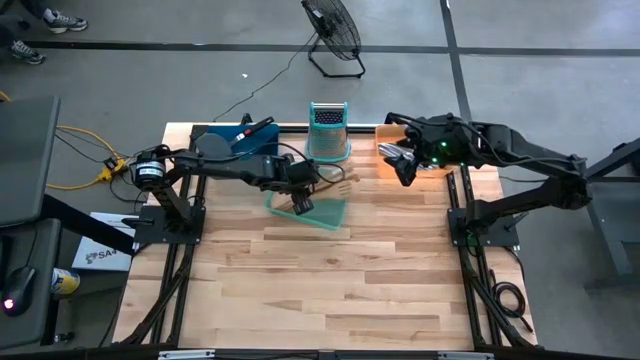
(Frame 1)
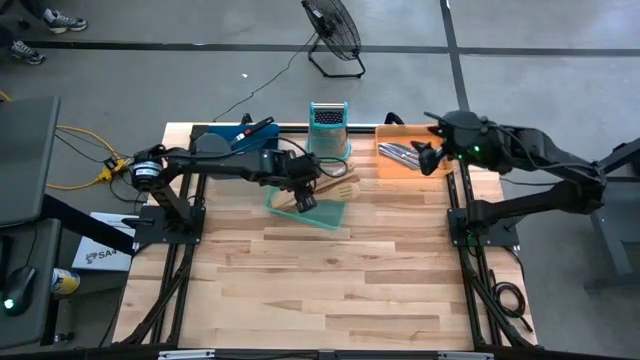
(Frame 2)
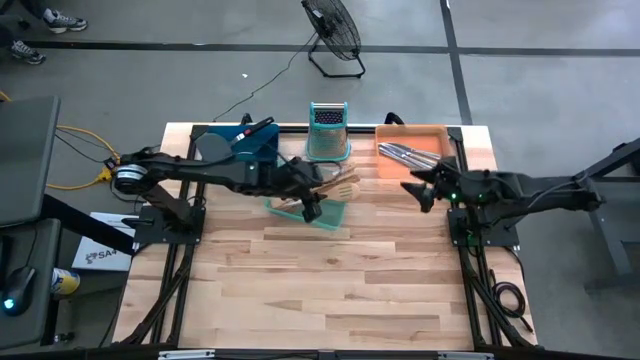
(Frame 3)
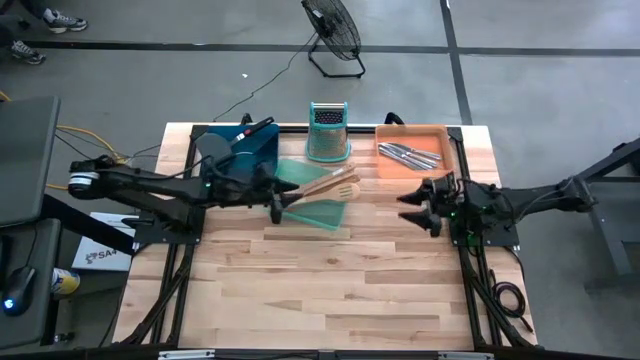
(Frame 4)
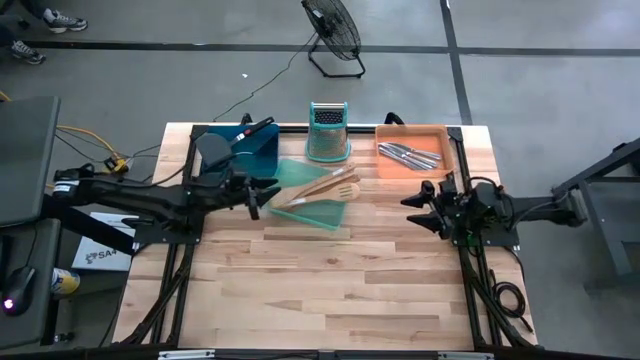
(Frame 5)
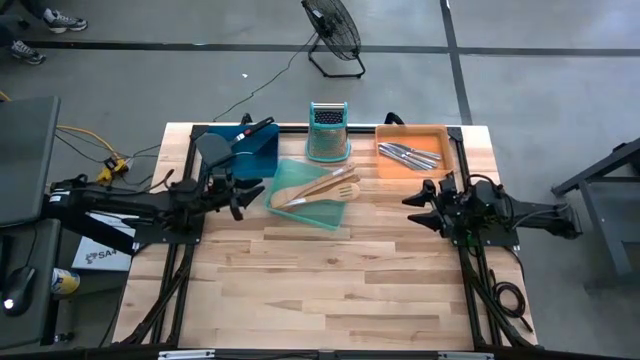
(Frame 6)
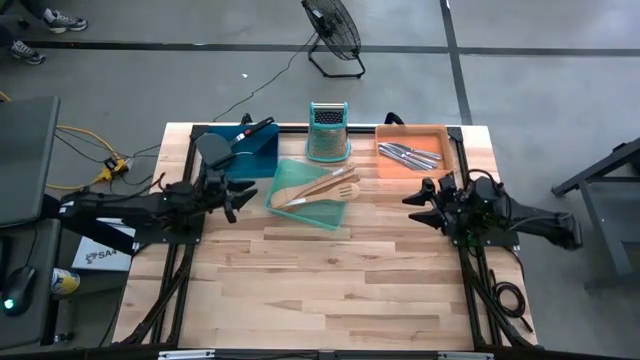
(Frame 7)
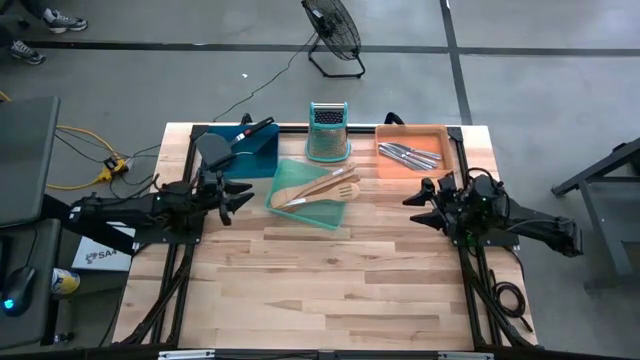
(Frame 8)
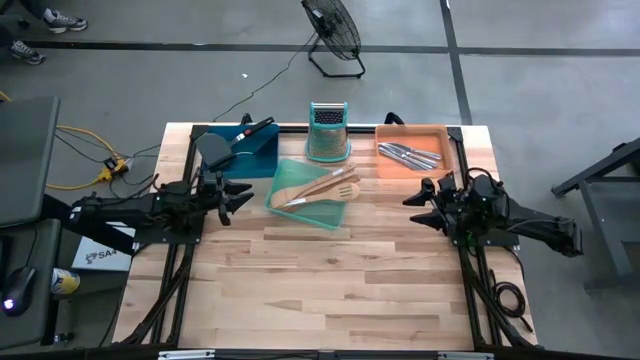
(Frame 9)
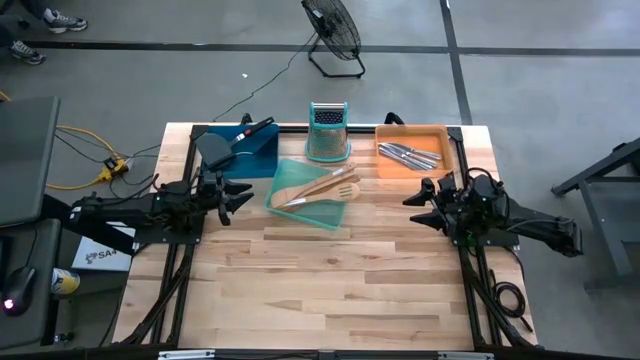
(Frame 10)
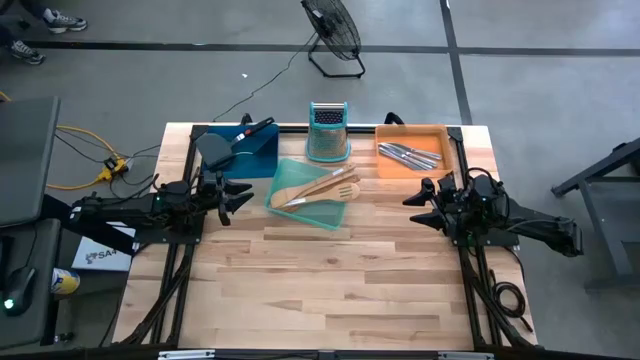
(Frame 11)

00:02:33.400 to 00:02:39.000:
Task: Pick & Place Kitchen Items
Return to Home Position

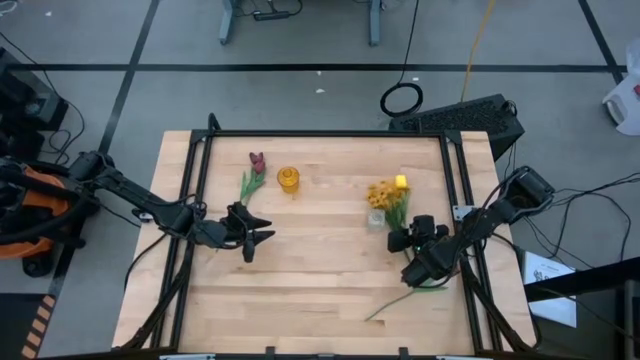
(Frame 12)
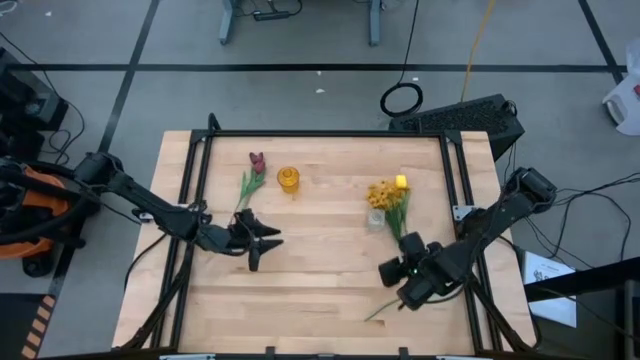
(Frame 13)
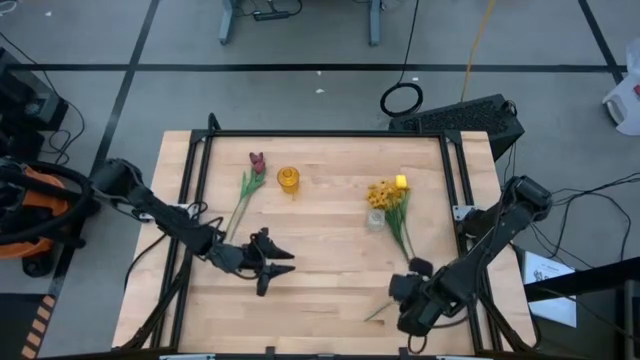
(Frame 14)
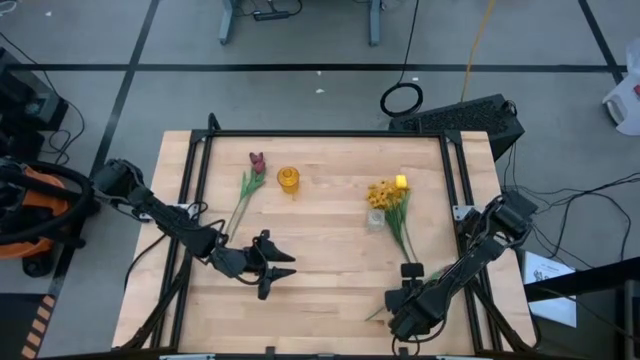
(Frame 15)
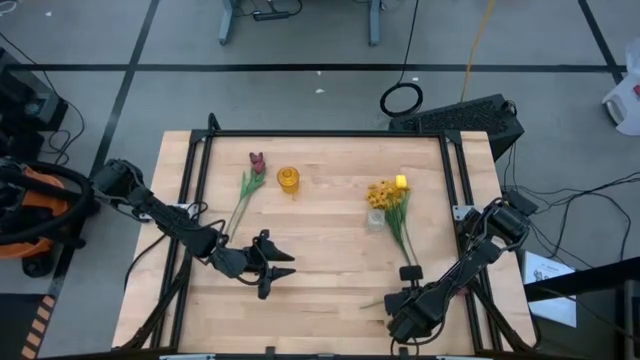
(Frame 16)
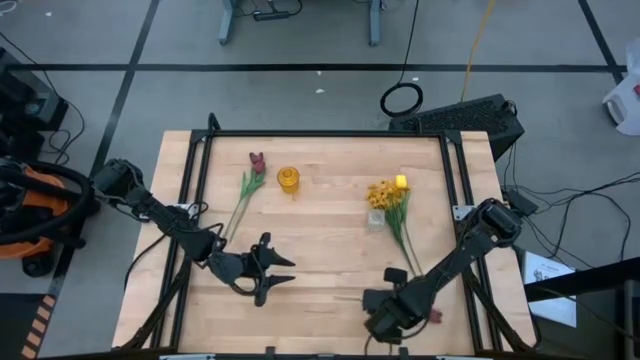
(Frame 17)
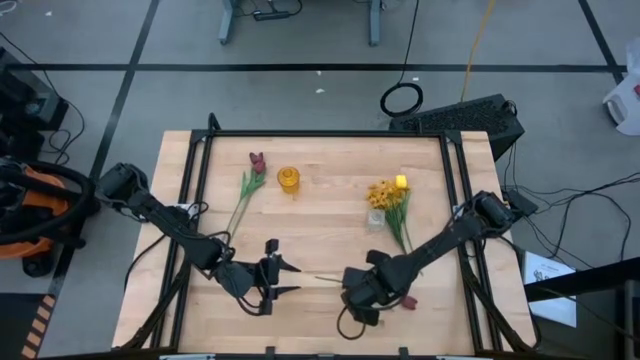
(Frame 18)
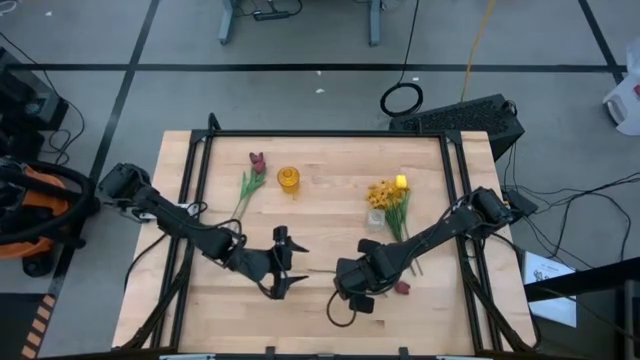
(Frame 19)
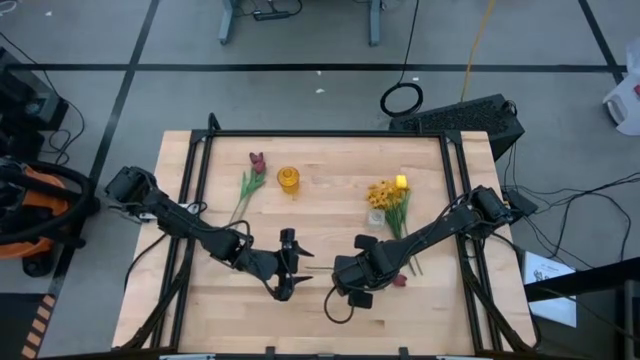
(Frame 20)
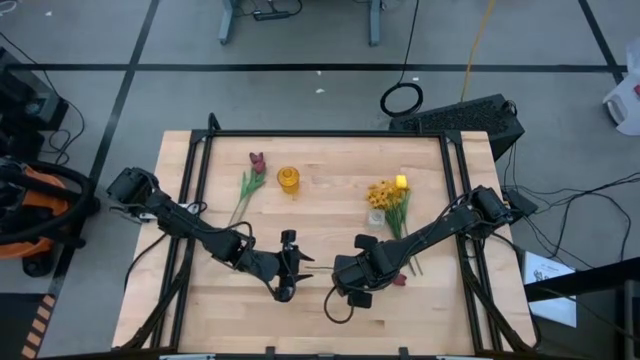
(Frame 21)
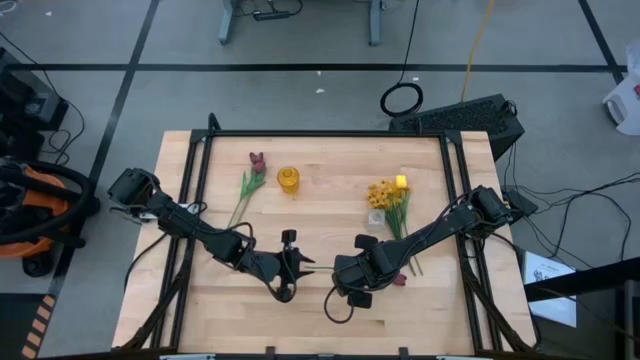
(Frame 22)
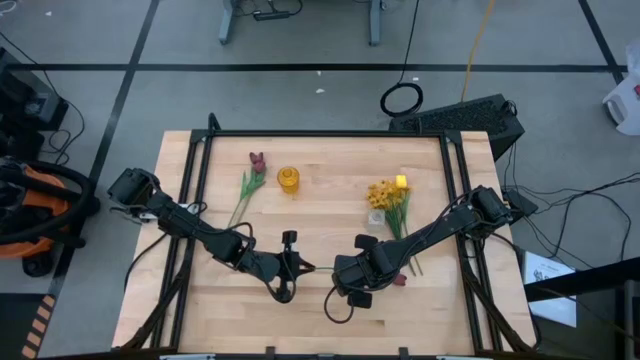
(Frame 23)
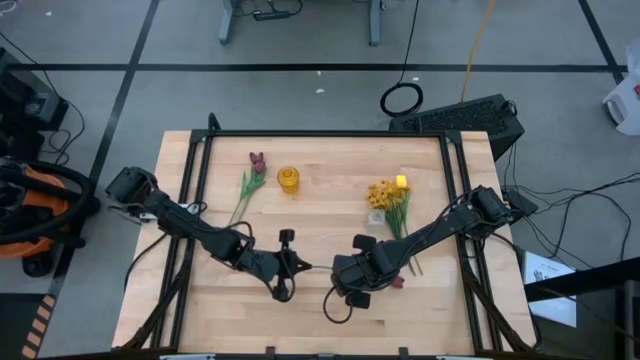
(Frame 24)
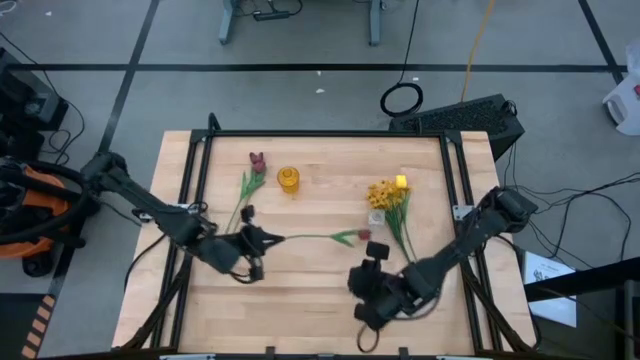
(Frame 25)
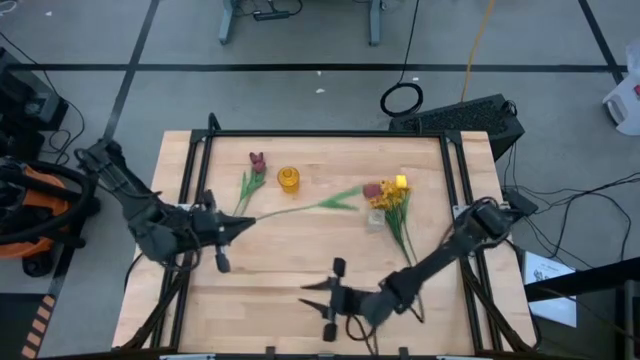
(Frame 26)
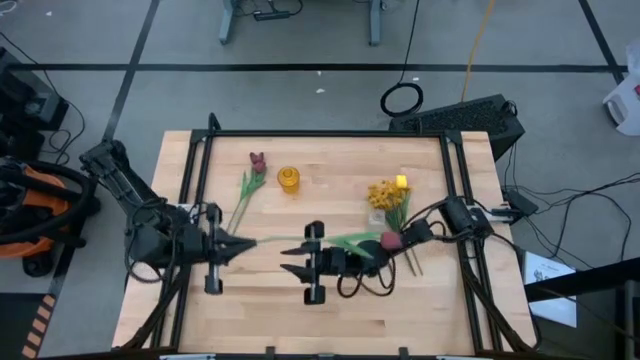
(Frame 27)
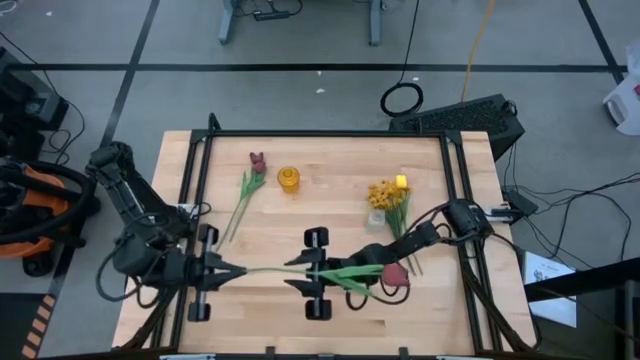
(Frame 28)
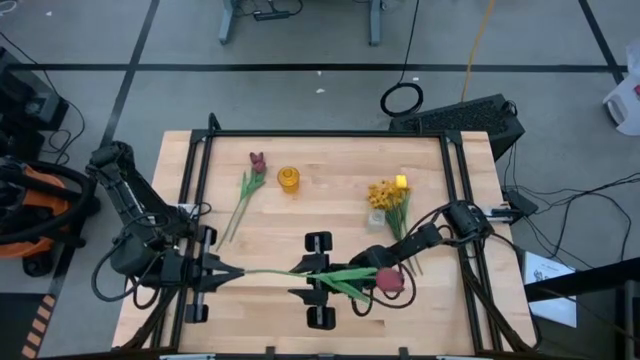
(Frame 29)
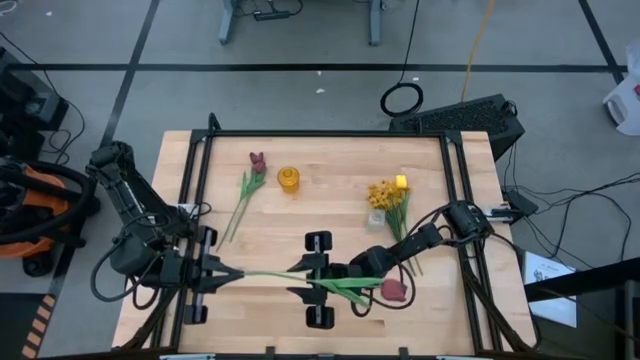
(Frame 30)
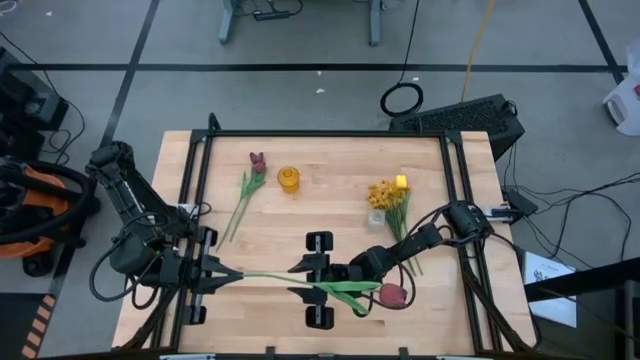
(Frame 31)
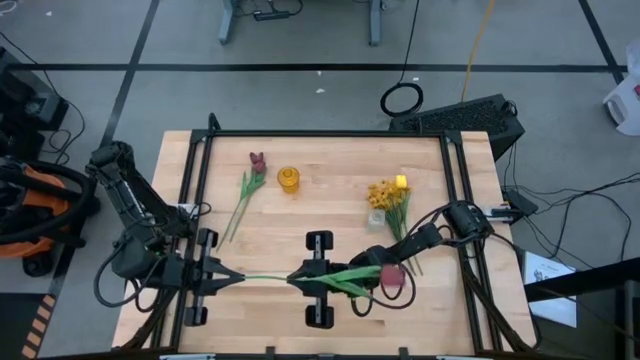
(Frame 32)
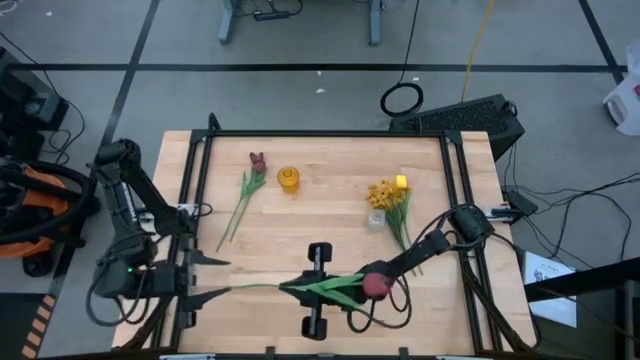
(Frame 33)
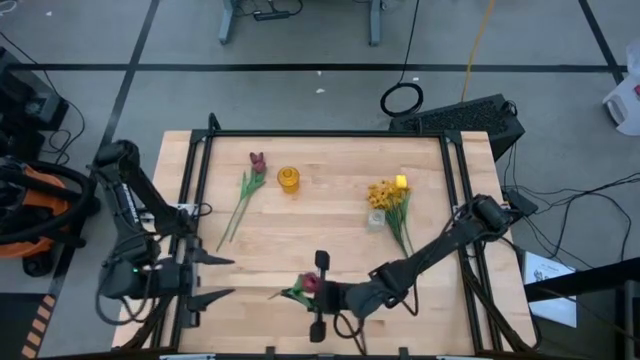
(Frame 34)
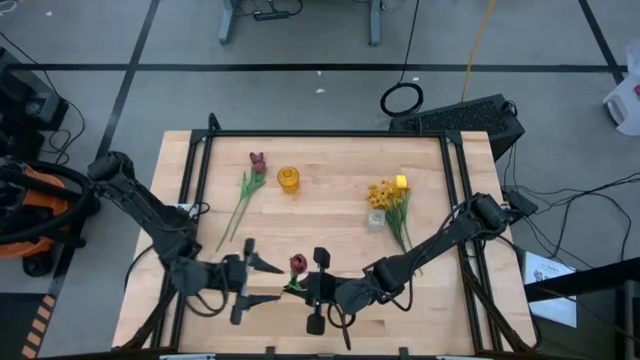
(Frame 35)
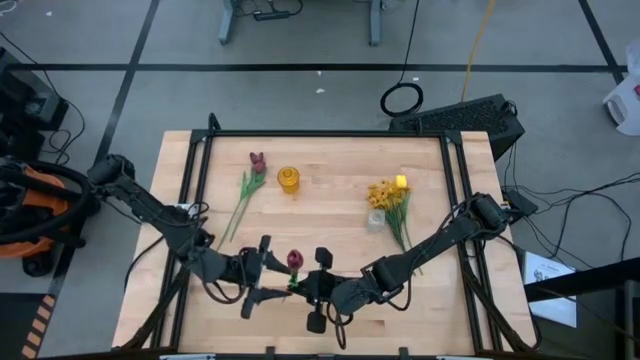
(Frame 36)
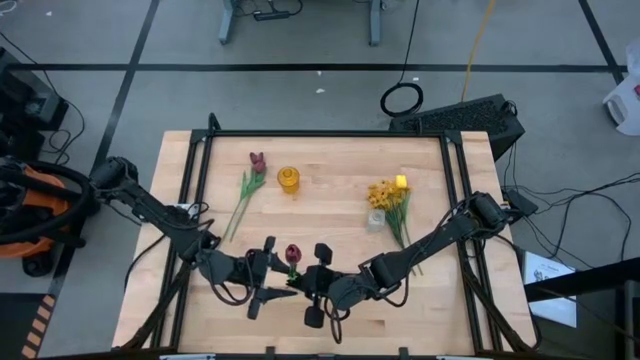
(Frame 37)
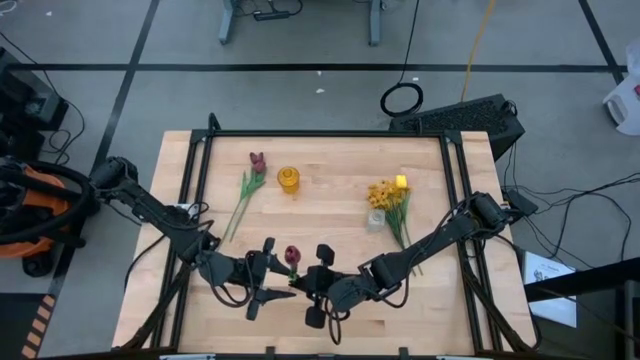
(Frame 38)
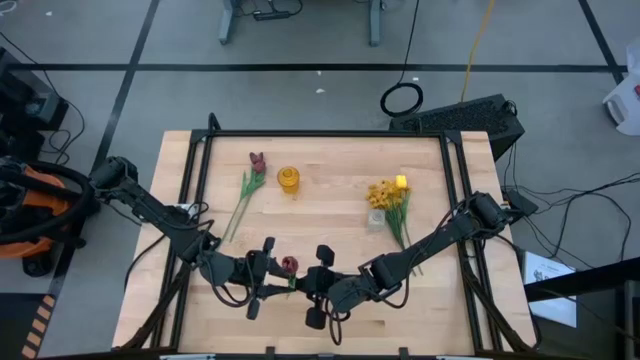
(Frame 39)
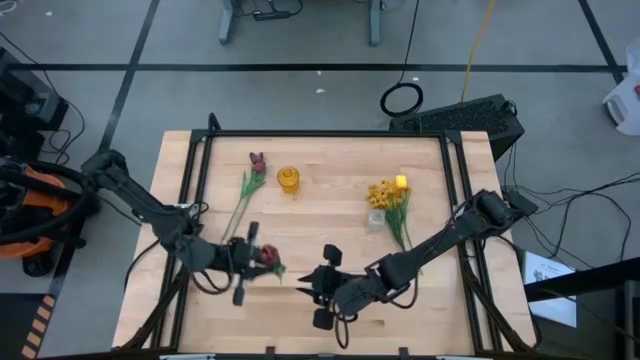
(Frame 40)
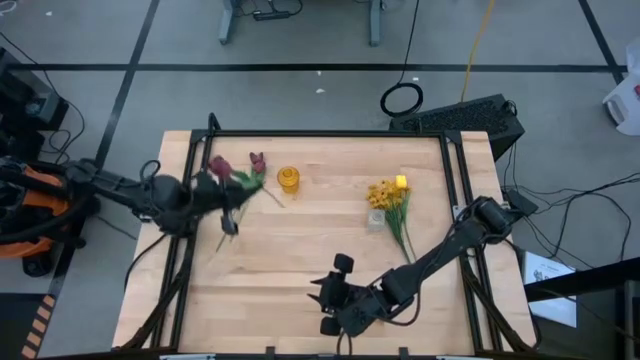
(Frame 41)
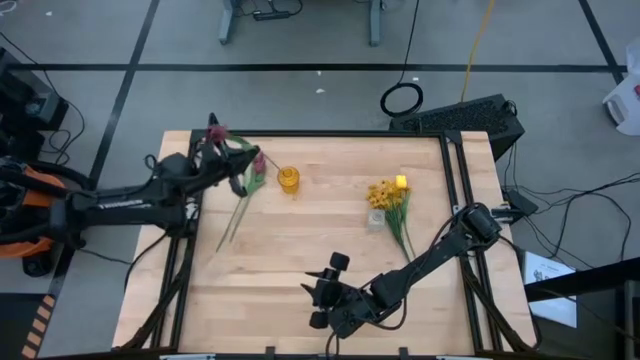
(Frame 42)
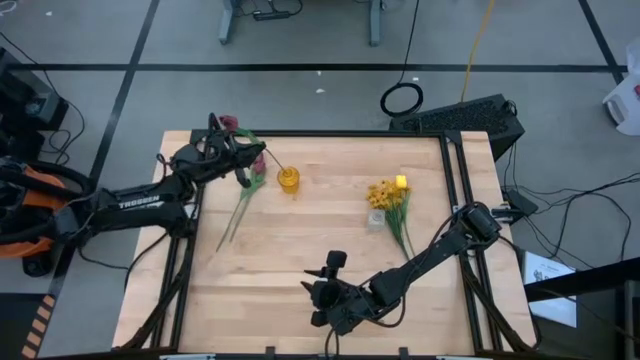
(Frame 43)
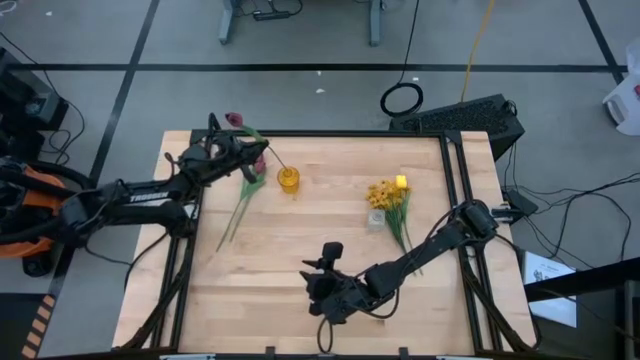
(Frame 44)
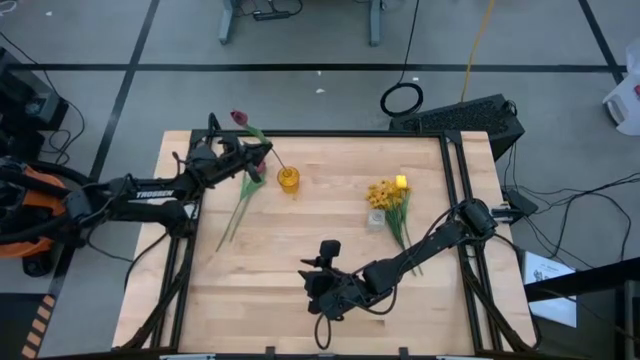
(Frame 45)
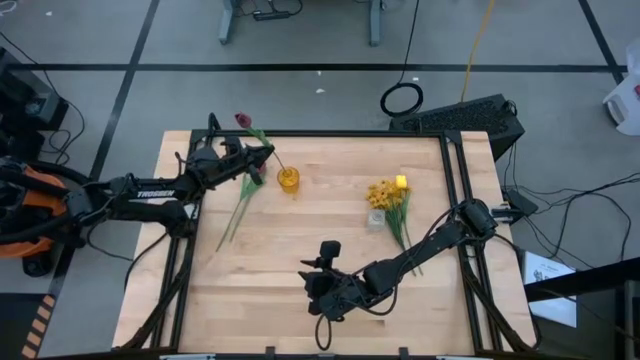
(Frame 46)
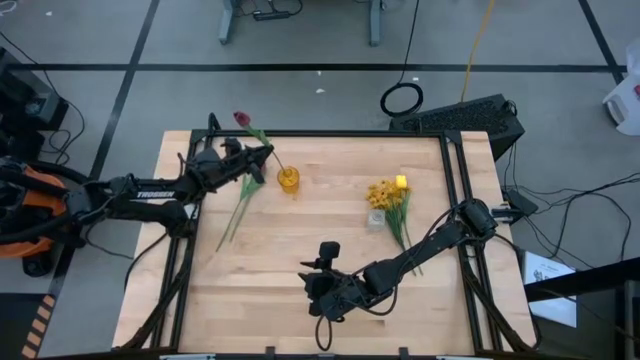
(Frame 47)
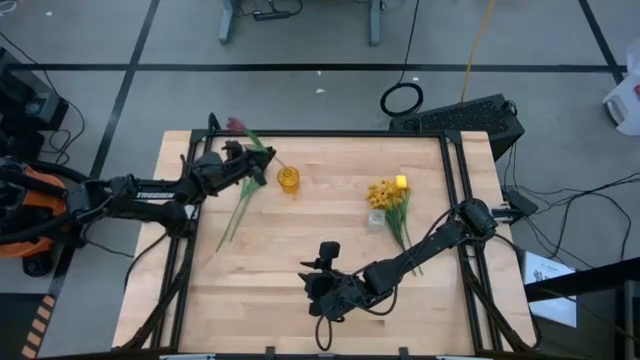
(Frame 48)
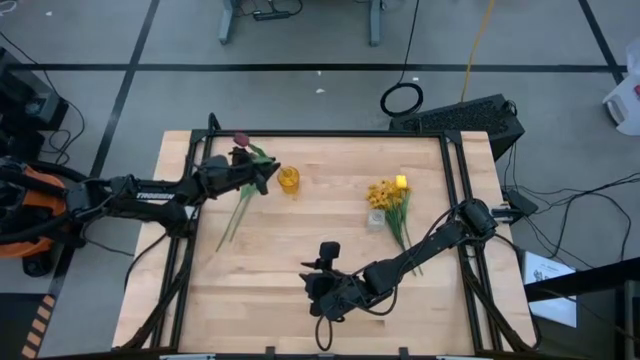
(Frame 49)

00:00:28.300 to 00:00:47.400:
Task: Sort flowers into vase by color
Put the red flower into the yellow vase
